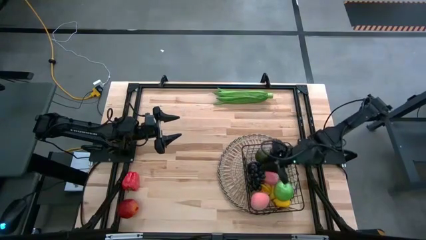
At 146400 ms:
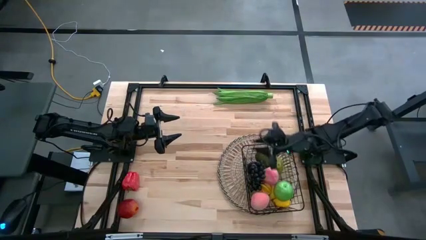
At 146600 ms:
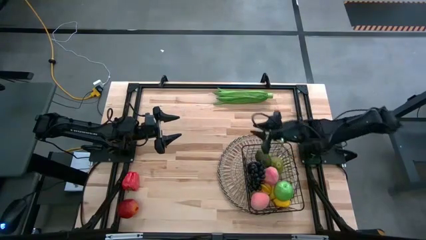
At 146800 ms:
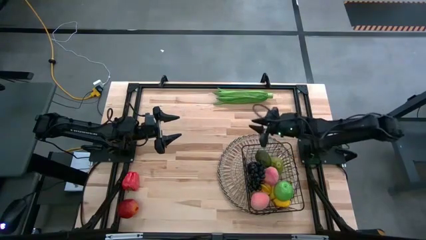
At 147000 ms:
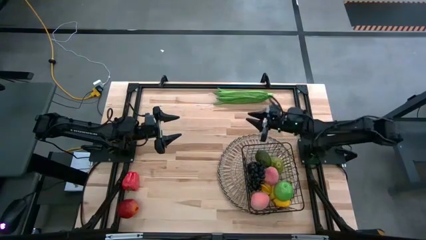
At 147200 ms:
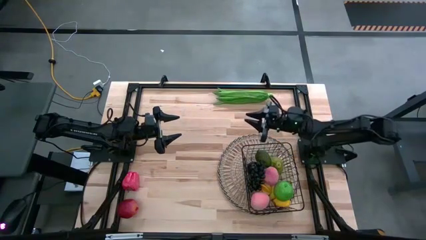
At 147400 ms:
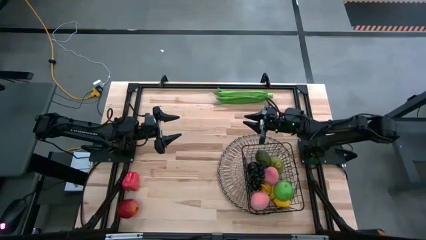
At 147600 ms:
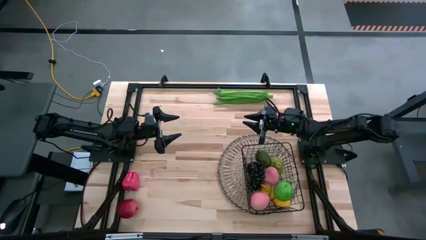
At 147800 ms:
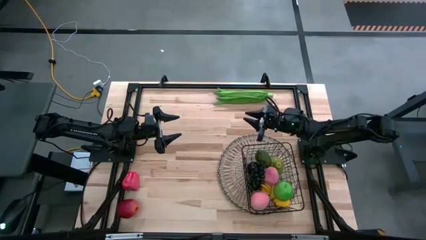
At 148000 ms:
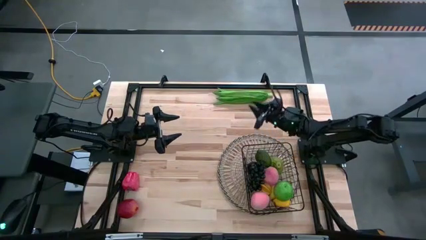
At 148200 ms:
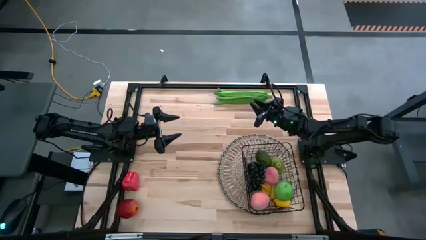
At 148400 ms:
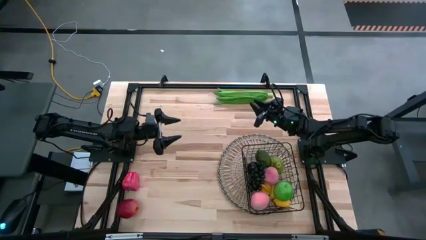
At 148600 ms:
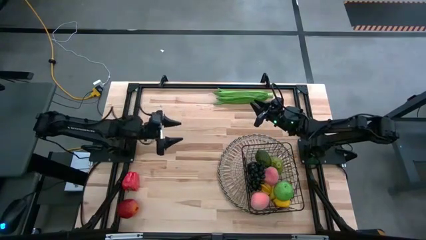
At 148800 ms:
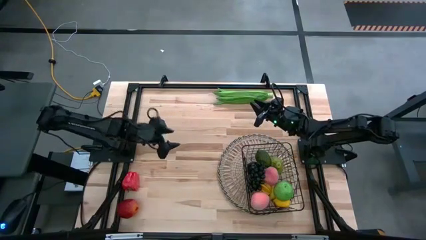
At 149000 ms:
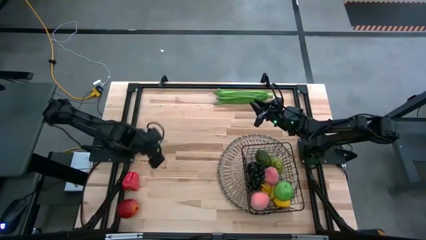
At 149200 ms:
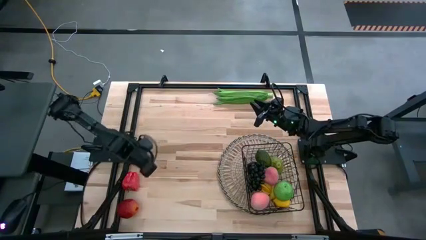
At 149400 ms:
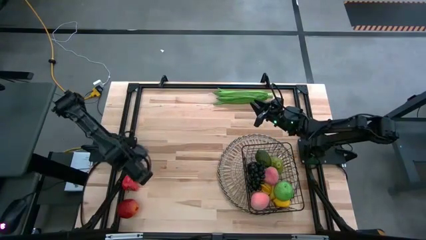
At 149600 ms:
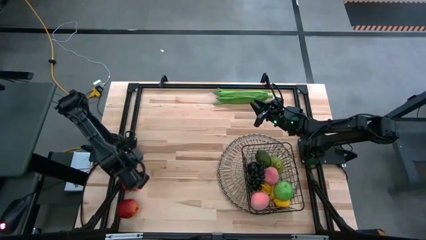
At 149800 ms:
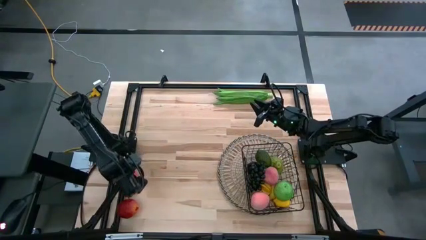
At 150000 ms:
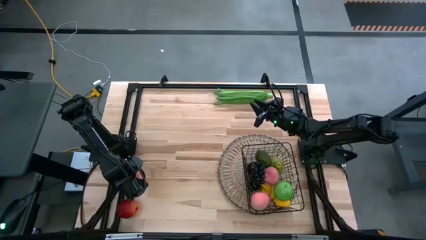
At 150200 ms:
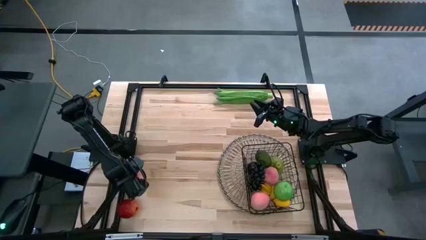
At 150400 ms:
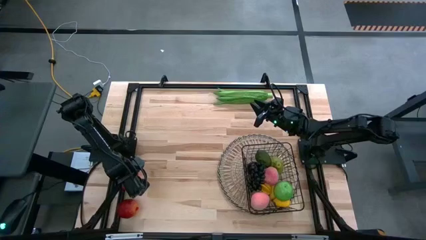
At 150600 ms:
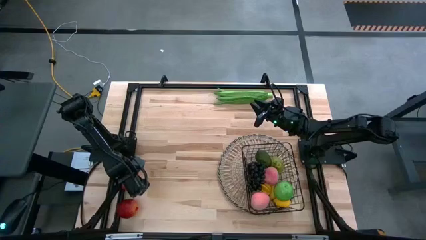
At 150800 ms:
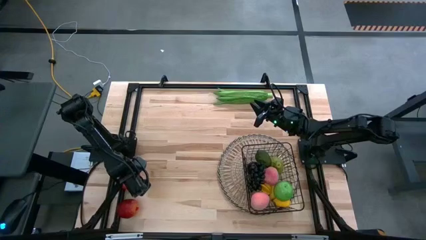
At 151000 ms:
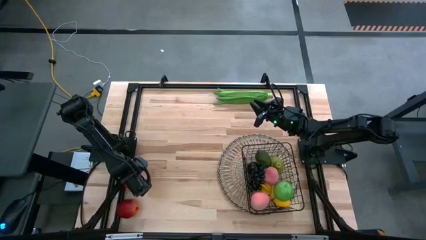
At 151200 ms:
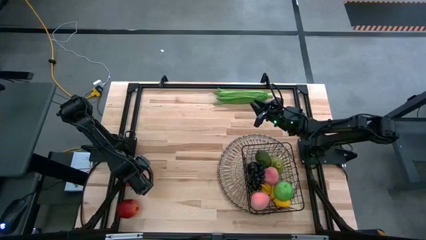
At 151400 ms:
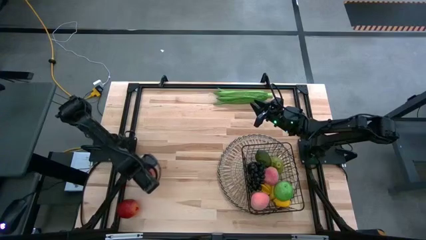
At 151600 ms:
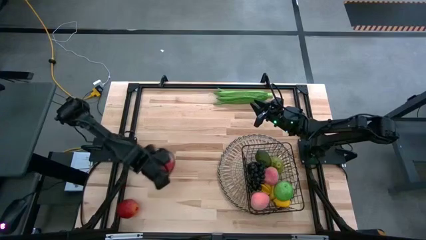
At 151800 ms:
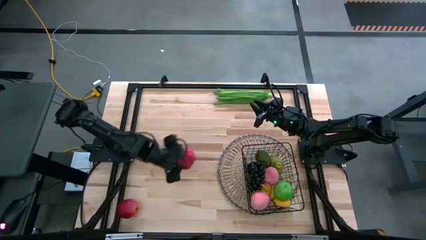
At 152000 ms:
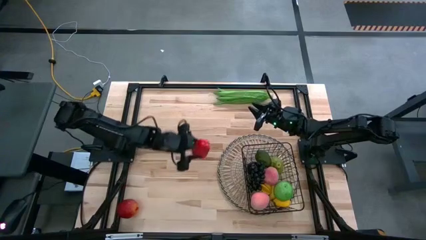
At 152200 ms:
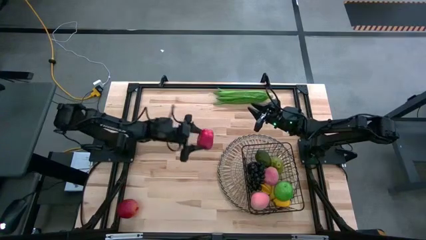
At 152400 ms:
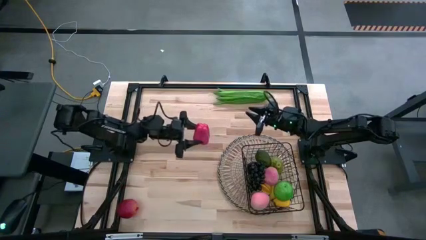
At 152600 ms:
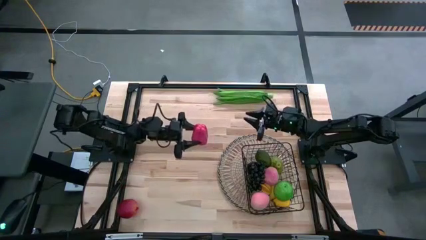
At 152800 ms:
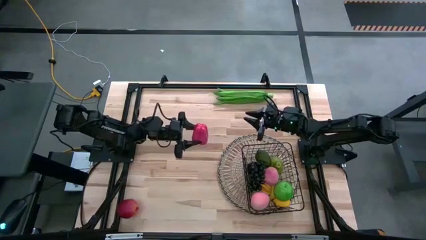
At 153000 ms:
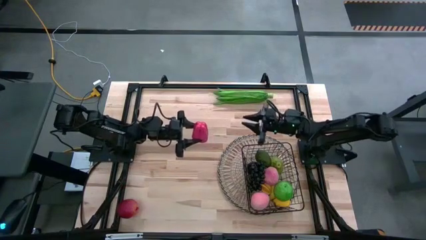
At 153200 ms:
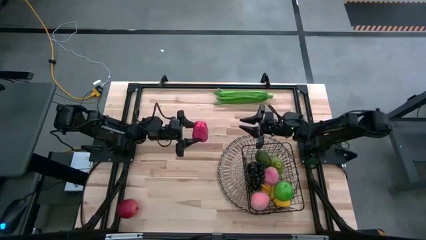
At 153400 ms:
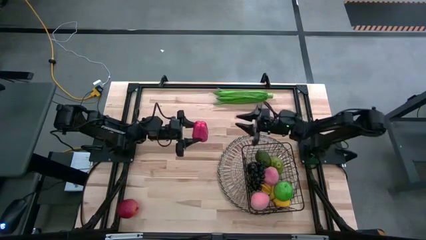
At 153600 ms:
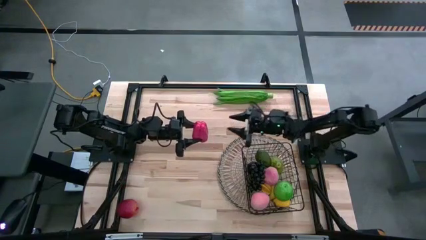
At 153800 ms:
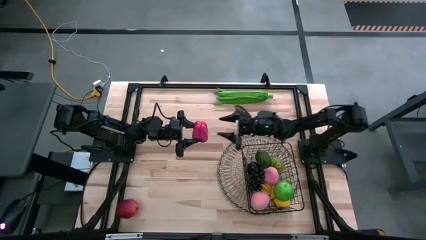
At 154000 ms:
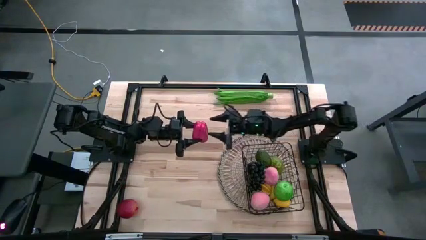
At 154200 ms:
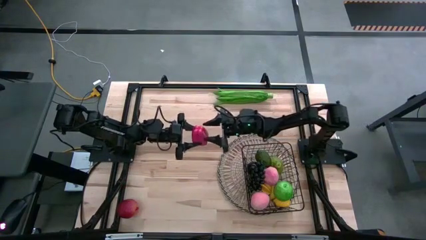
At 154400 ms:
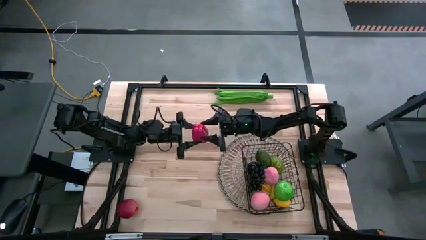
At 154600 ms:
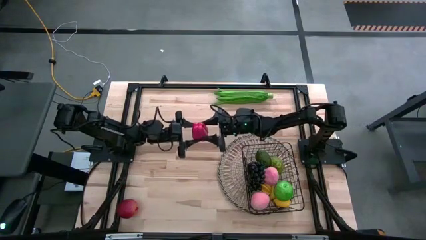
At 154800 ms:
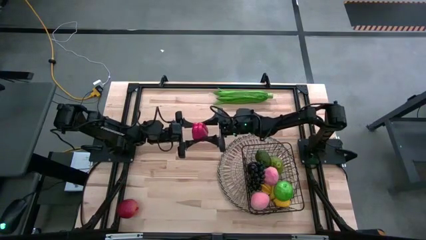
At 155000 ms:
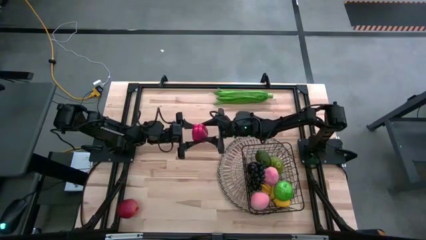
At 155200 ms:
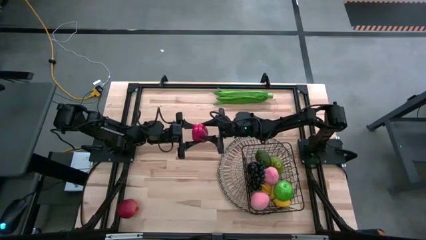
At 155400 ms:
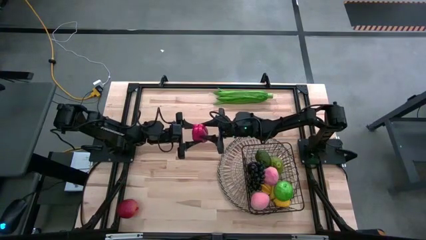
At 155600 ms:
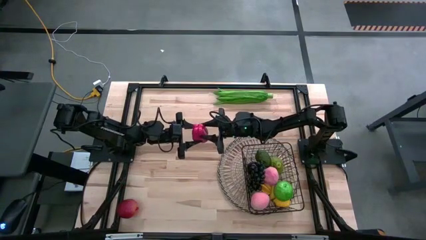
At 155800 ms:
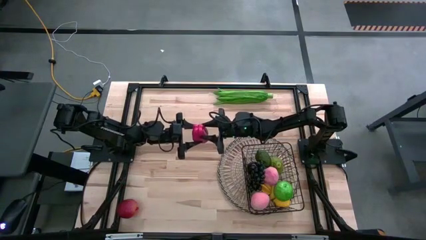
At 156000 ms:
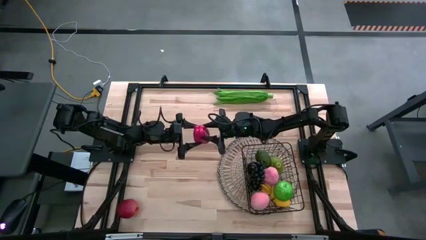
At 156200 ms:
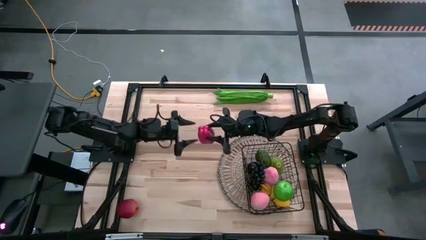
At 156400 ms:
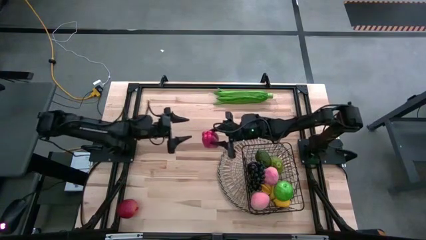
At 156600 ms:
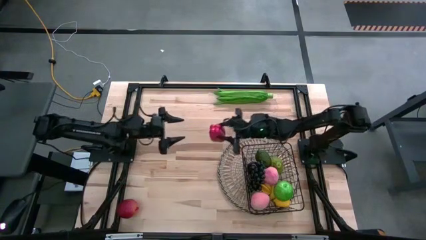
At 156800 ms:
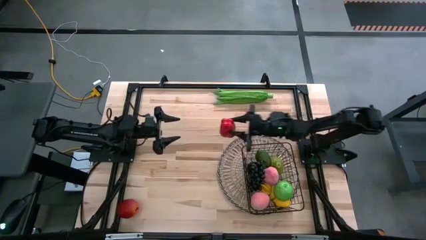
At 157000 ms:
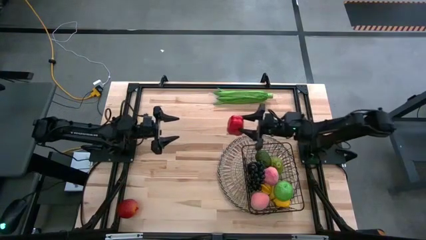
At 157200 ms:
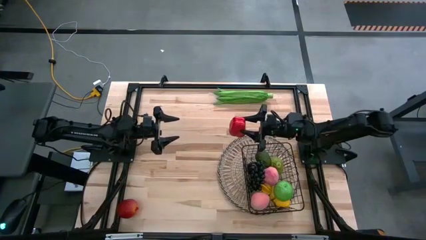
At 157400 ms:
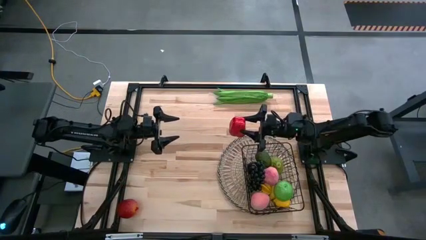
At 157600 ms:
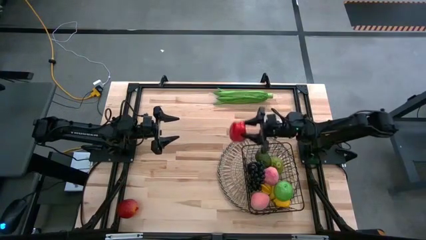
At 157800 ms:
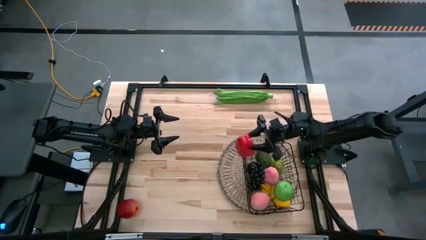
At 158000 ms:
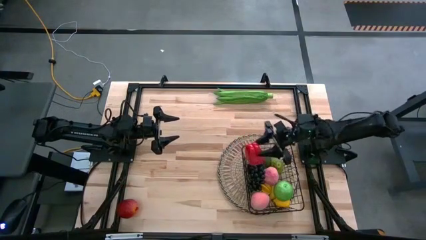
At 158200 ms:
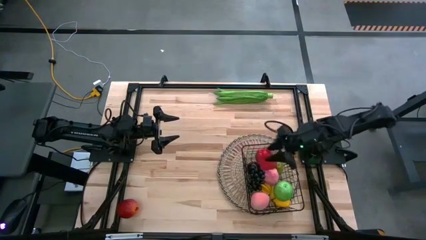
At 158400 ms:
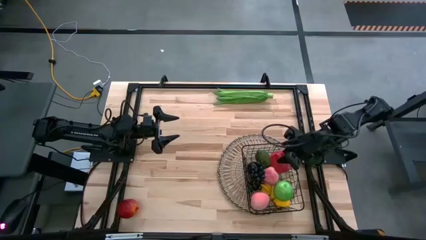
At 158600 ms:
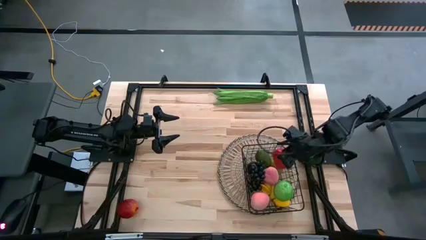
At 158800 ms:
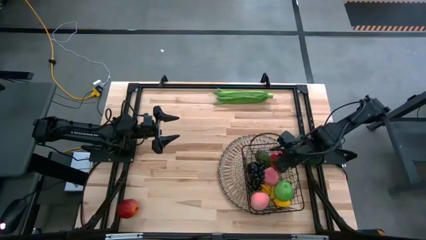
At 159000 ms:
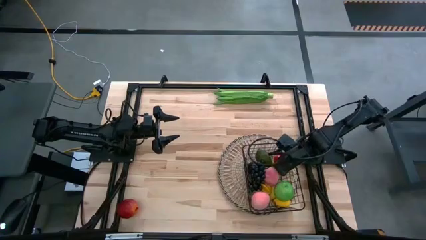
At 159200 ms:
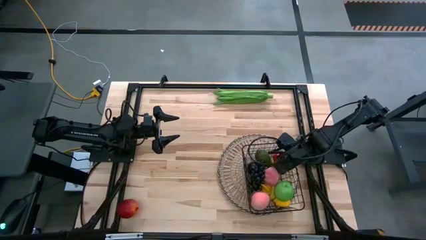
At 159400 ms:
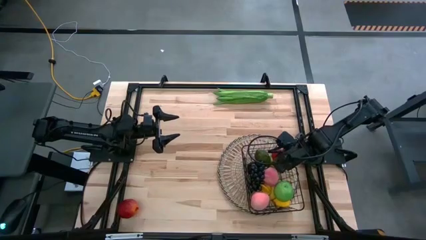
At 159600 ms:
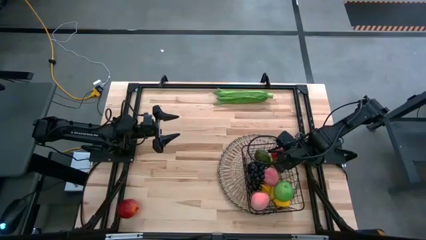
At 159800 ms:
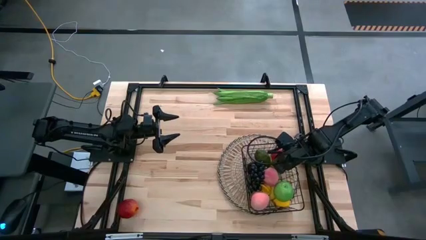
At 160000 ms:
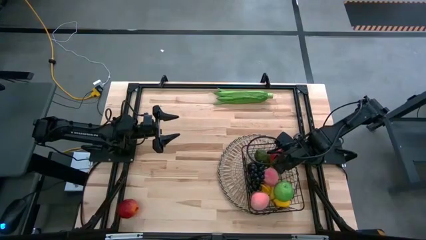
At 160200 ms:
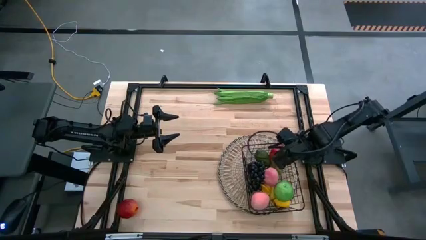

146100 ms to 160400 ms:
Task: Build produce basket
Put the bell pepper into the wire basket
